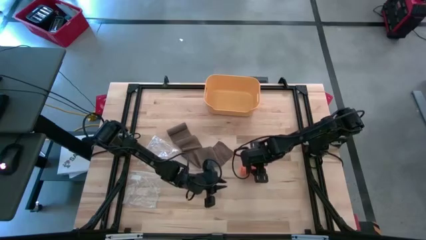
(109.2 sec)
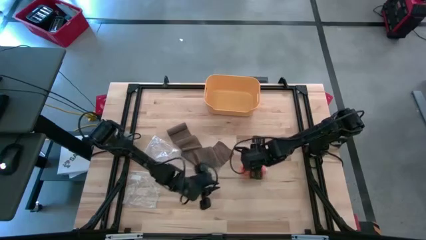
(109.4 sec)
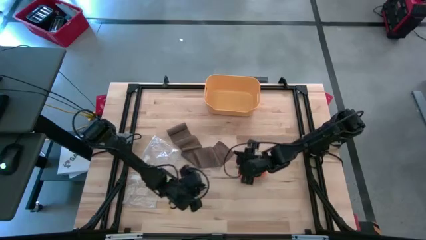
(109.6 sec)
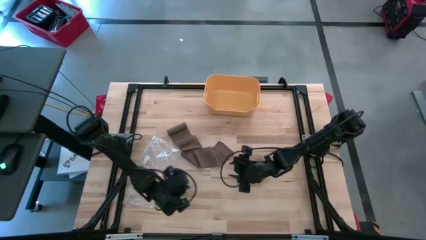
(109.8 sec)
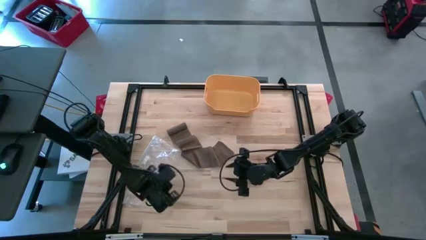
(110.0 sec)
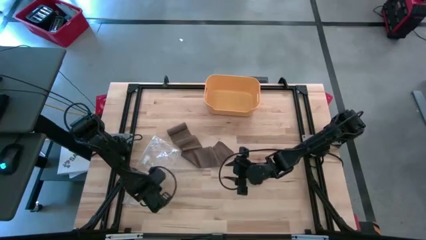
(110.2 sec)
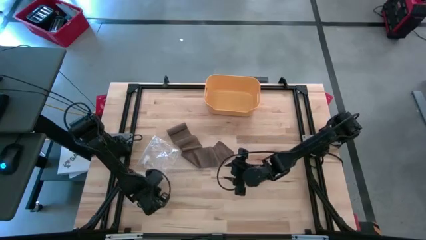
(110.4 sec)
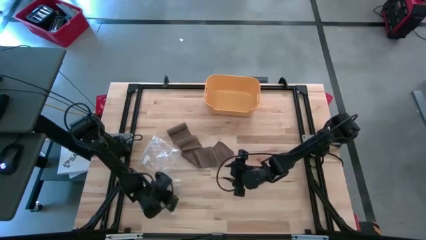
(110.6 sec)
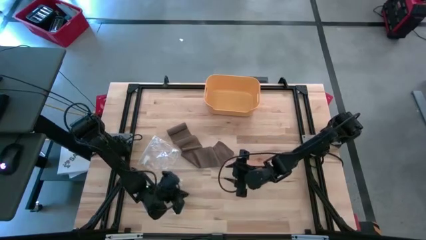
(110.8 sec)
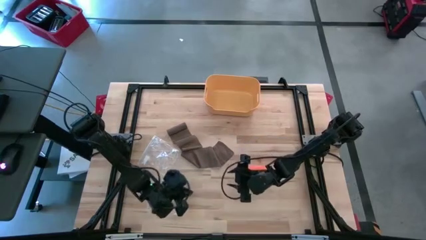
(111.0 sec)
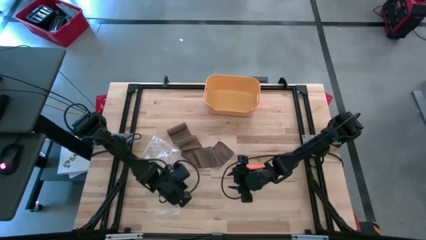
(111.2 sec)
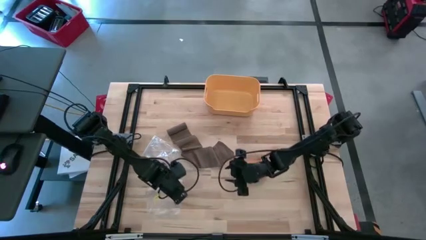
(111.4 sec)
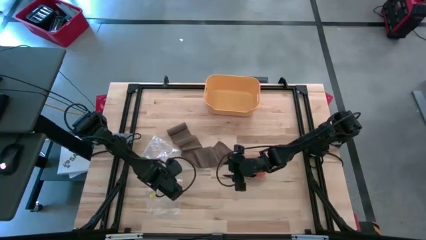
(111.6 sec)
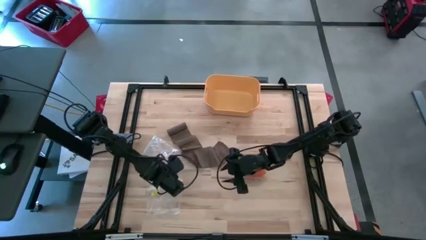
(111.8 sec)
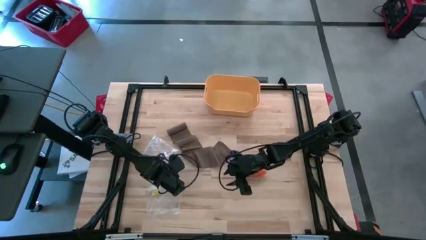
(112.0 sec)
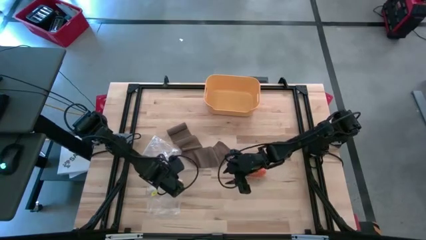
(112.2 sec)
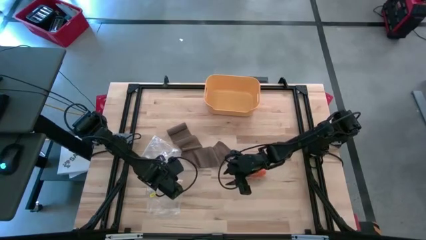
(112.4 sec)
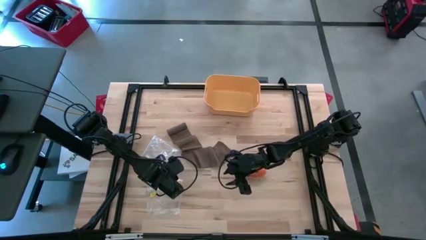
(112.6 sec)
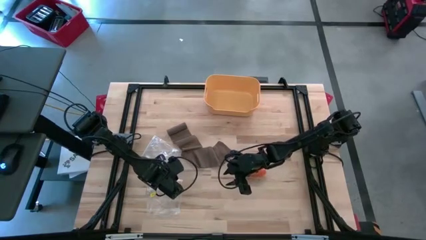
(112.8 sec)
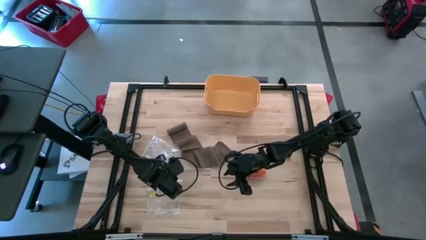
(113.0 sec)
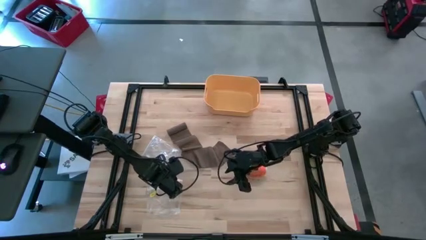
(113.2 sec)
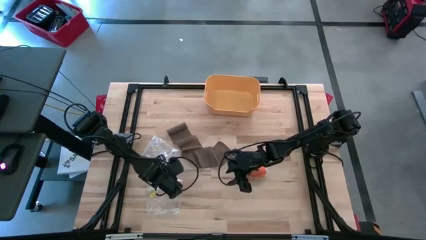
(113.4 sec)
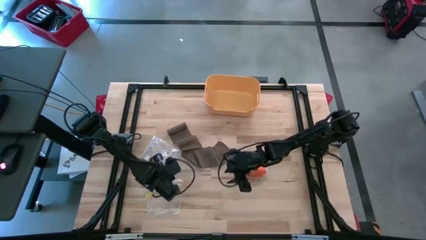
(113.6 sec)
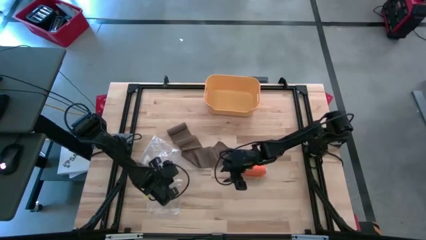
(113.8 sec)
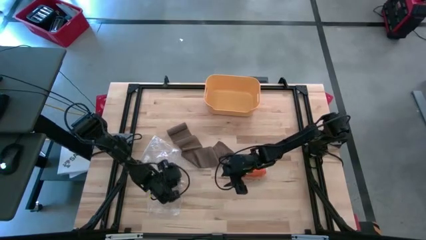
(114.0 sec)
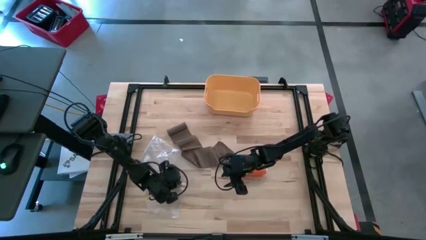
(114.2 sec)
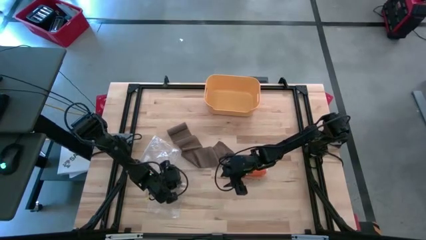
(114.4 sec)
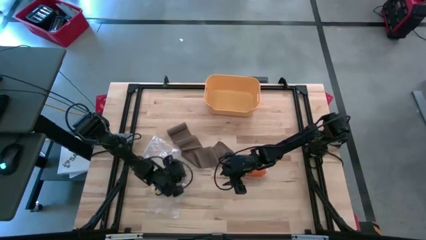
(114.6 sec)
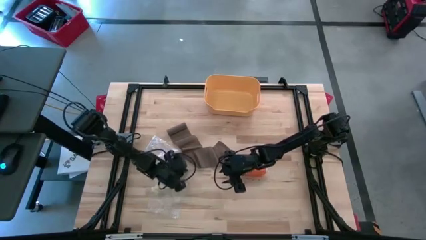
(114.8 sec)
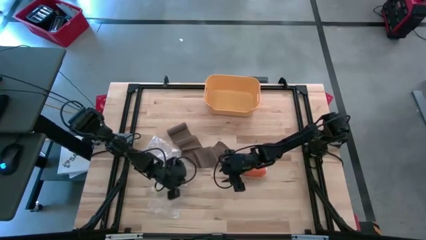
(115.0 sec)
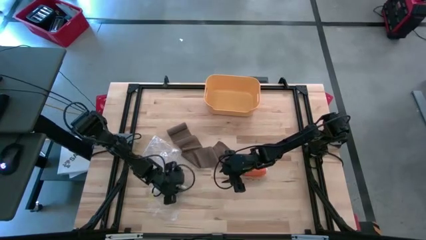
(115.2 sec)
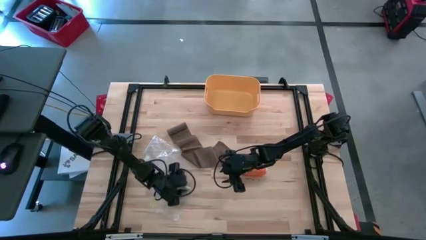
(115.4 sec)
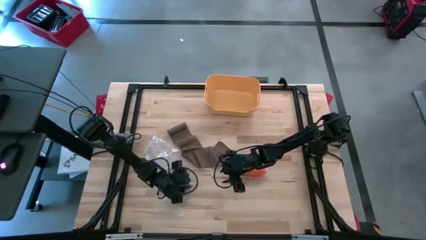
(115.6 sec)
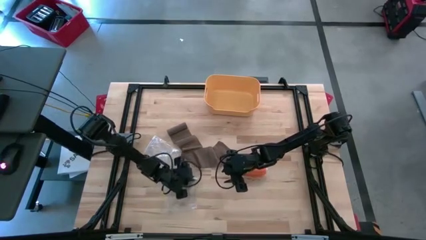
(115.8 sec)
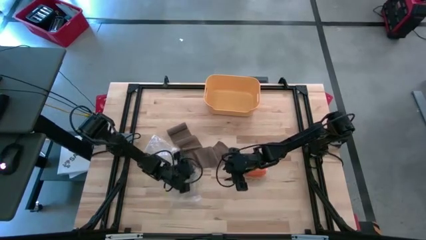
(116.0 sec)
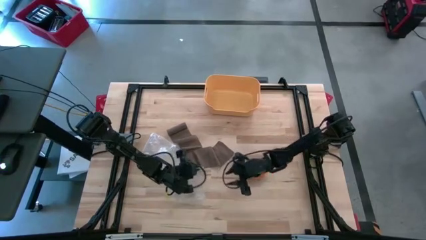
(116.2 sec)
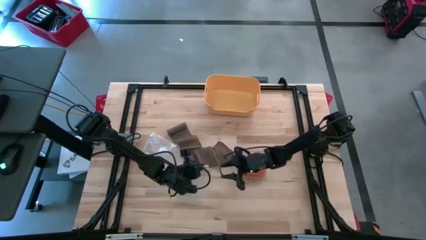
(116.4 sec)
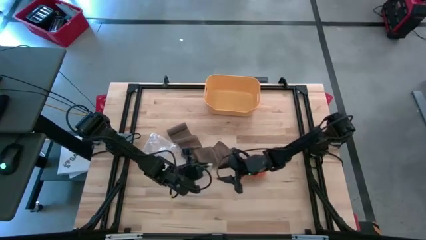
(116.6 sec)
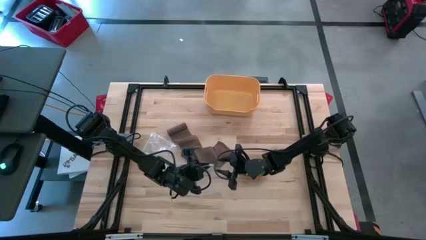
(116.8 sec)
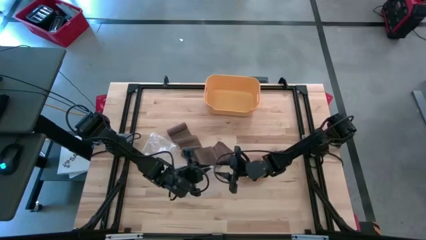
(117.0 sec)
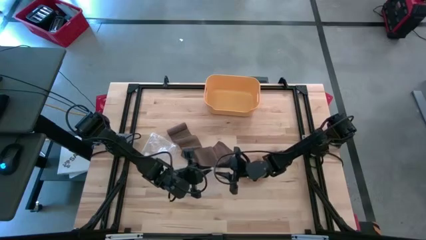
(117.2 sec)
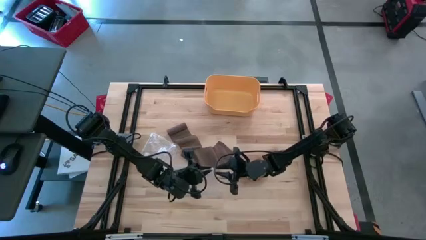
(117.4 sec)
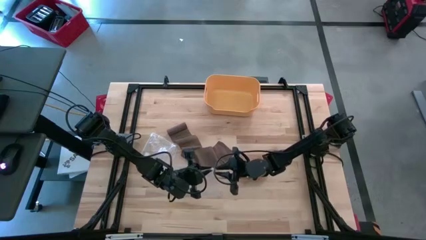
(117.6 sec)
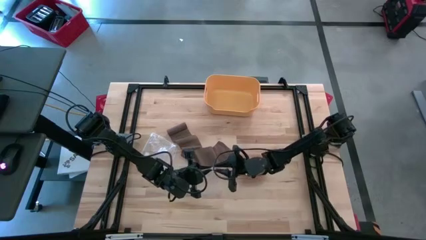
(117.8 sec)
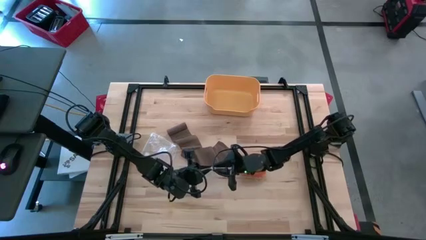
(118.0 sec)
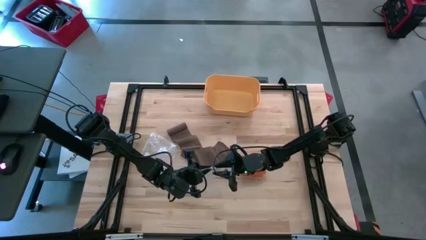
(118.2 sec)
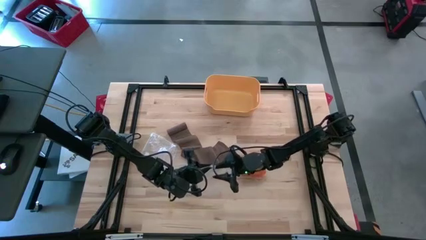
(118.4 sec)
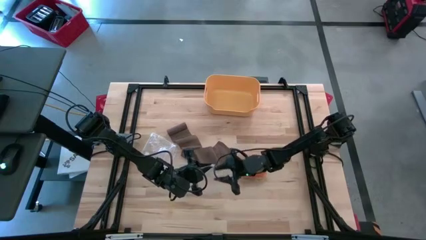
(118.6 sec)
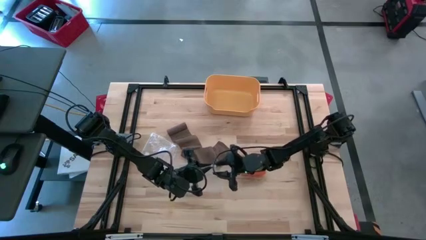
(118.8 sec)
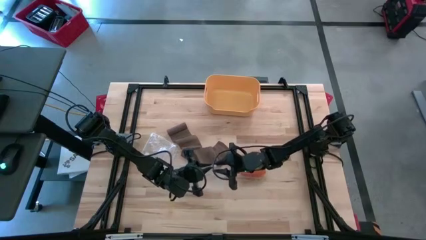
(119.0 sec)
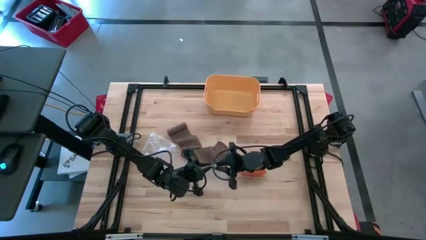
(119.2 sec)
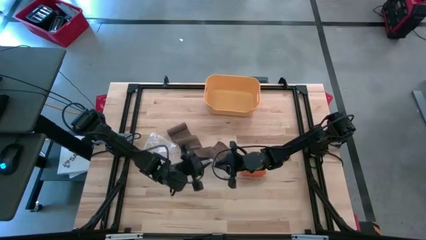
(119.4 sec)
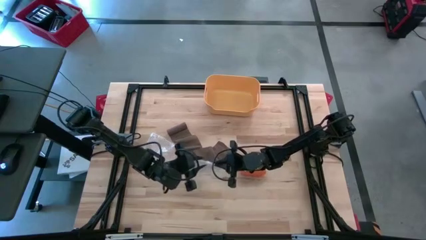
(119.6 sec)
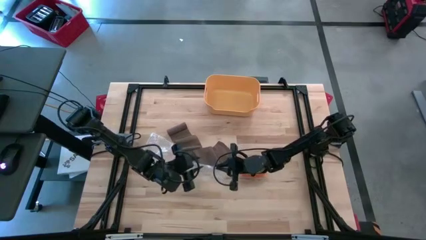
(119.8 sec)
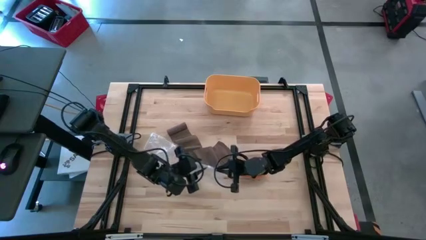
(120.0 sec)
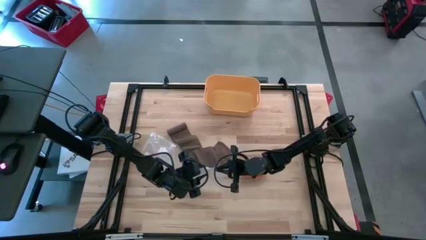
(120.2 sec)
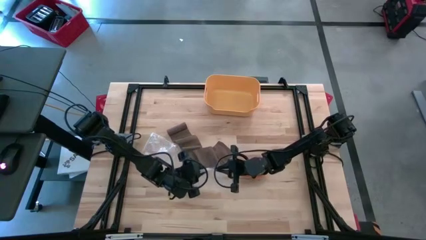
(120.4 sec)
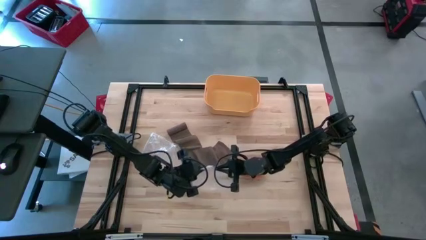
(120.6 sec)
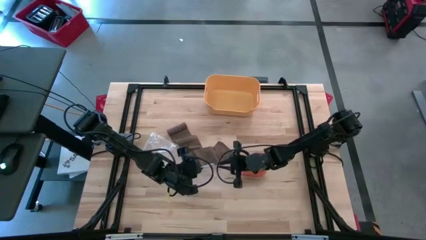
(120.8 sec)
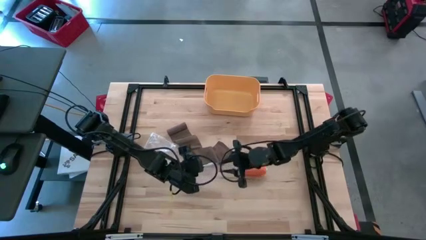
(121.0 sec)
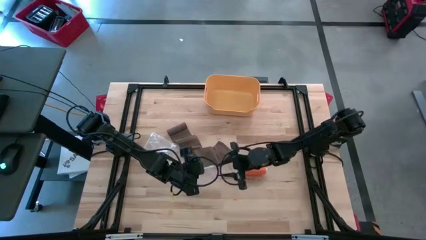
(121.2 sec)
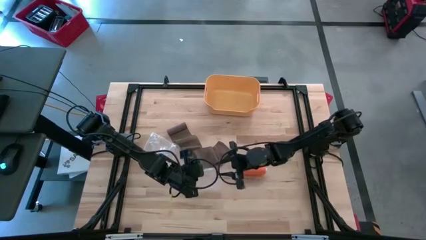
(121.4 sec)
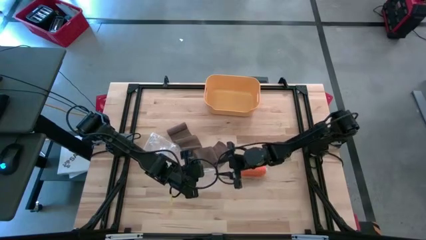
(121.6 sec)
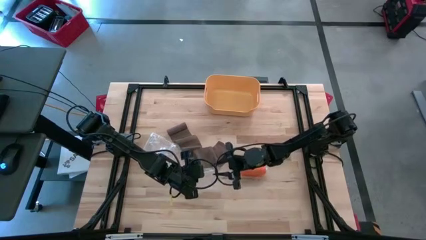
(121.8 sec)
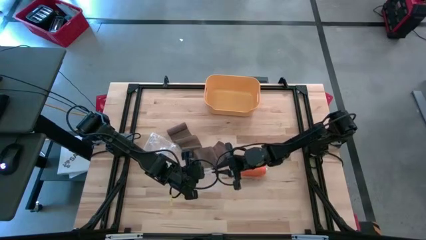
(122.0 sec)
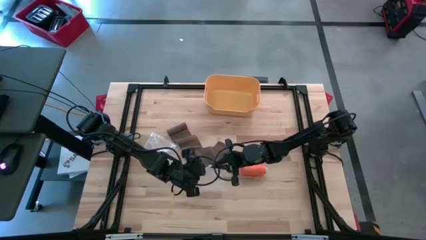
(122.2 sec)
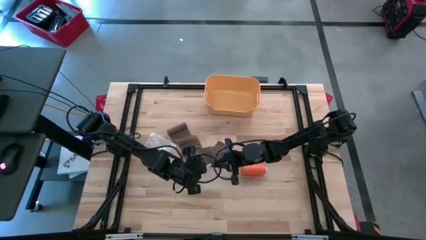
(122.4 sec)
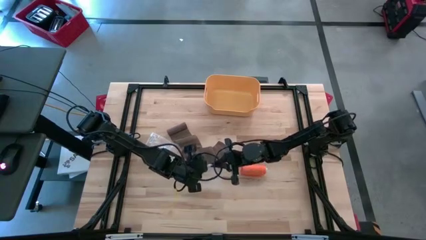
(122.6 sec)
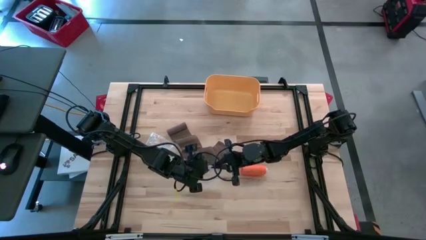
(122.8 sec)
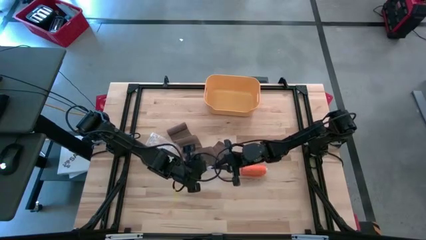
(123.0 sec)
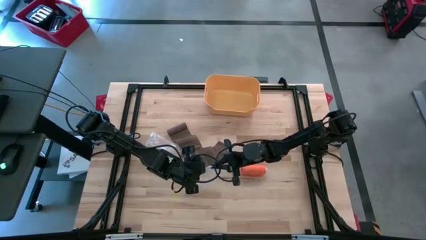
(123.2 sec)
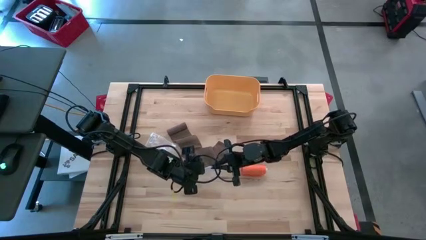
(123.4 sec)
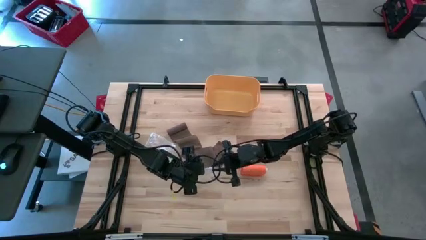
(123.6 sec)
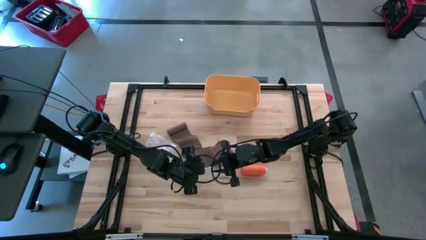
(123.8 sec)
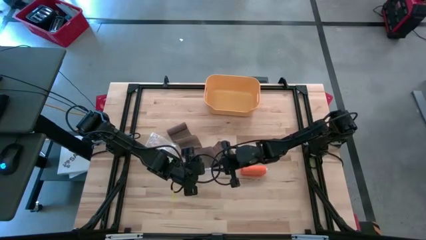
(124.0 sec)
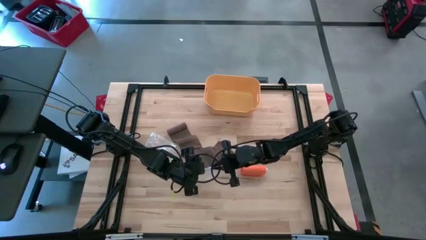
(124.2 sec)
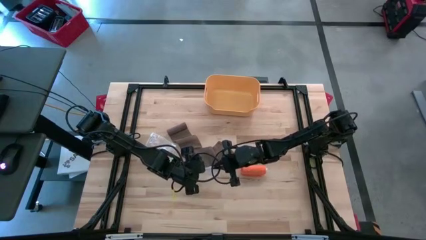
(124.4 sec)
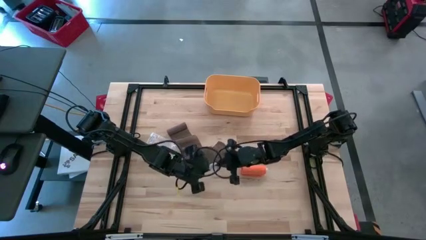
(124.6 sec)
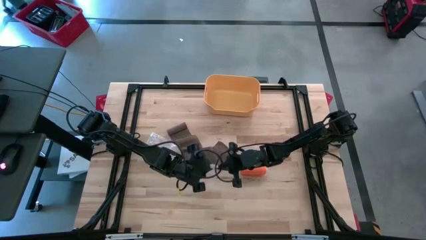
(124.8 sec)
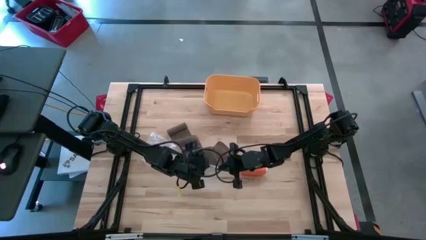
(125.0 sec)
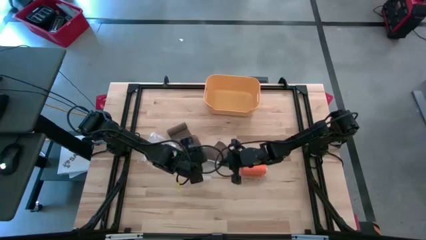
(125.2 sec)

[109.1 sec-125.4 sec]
Task: Roll bandage
Open the bottom transparent zip bag

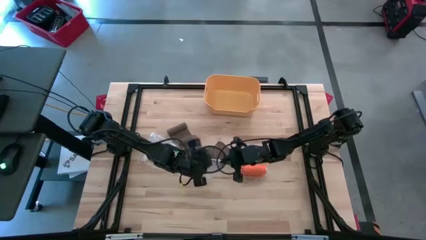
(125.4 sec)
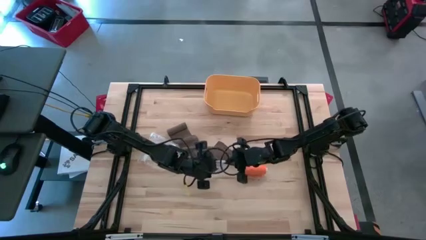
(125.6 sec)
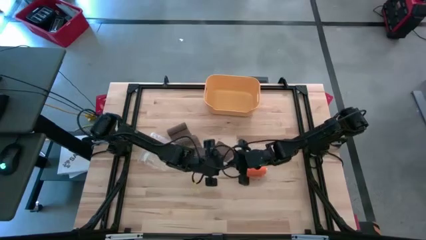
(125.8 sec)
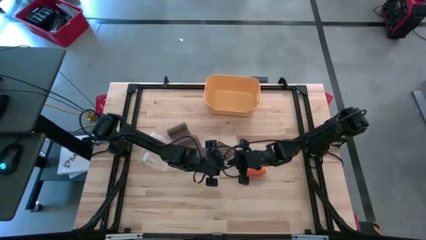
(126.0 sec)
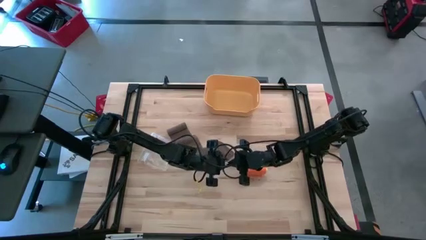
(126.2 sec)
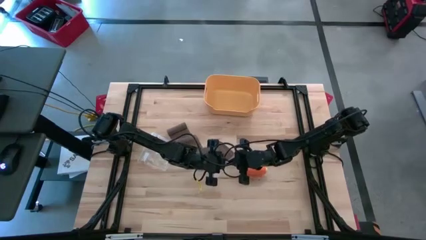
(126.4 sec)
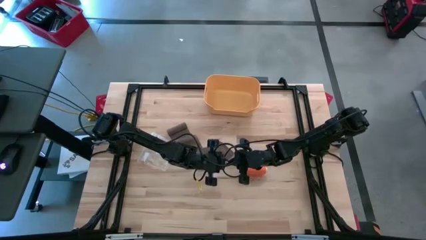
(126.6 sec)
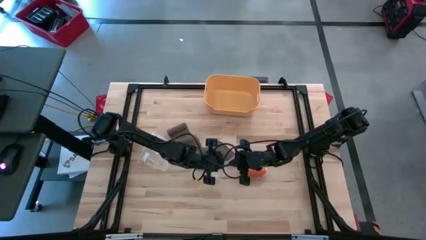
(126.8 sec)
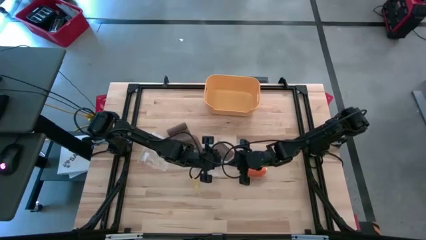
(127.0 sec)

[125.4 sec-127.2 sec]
Open the bottom transparent zip bag
